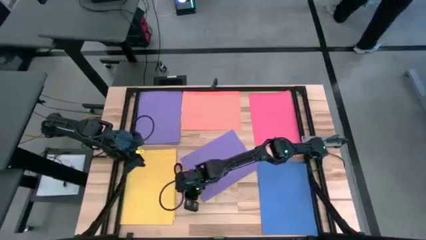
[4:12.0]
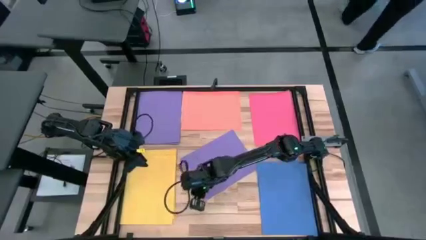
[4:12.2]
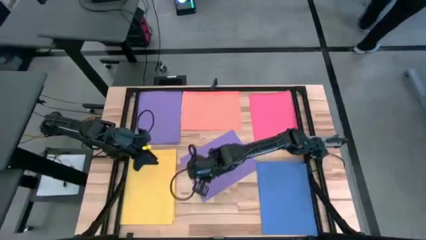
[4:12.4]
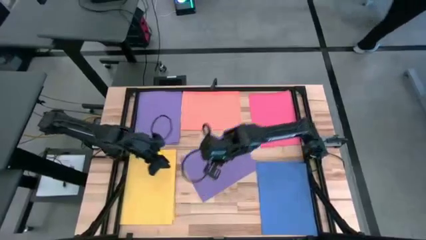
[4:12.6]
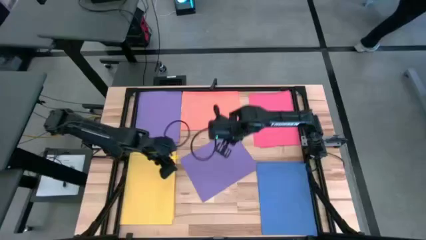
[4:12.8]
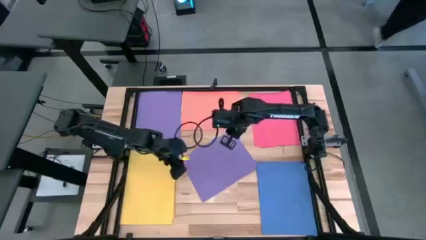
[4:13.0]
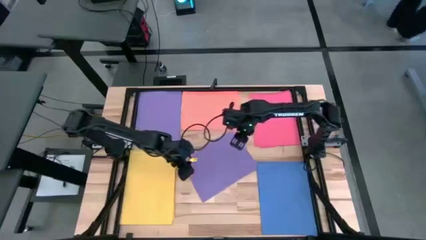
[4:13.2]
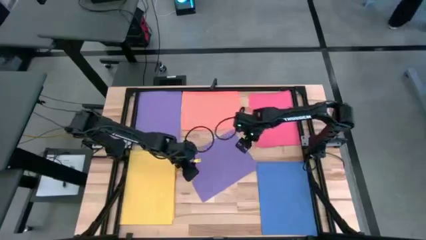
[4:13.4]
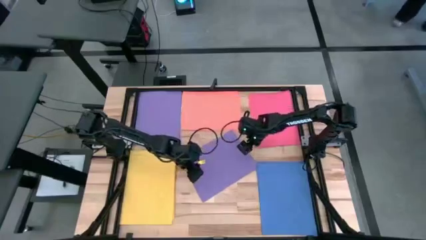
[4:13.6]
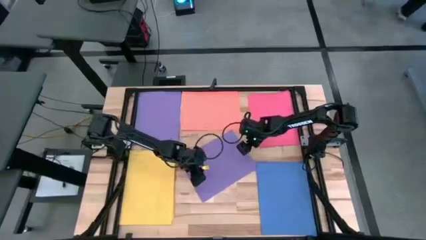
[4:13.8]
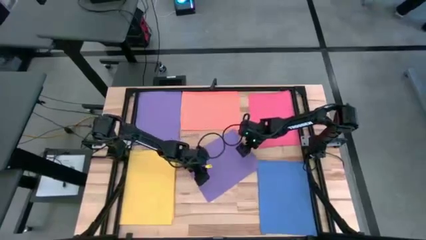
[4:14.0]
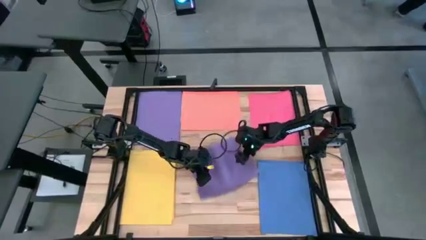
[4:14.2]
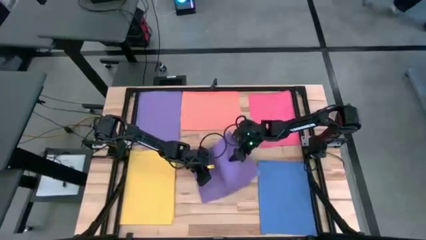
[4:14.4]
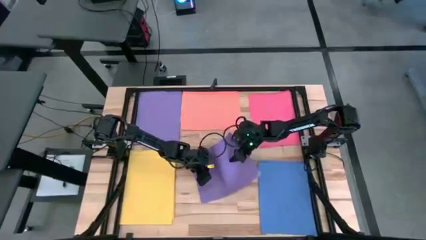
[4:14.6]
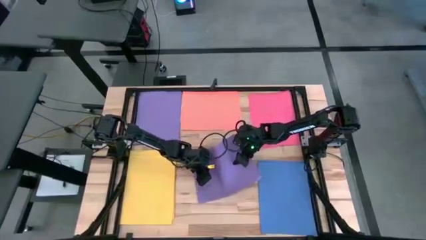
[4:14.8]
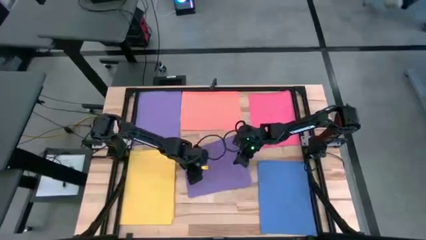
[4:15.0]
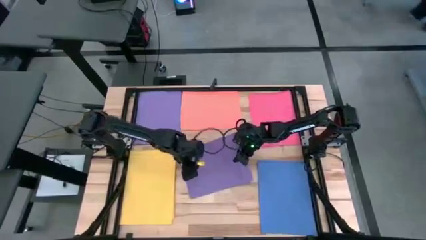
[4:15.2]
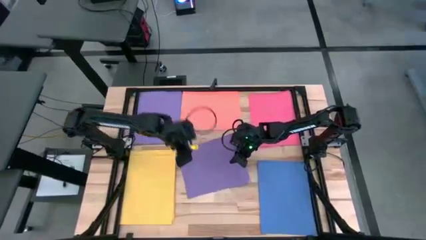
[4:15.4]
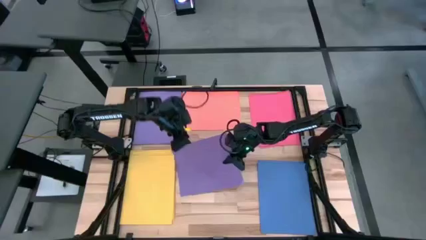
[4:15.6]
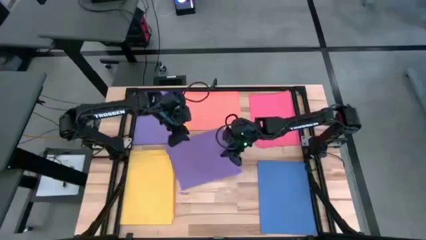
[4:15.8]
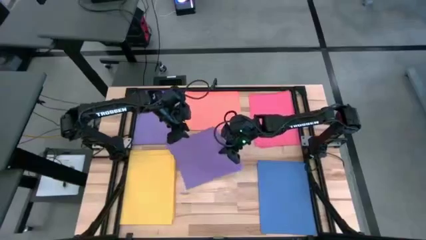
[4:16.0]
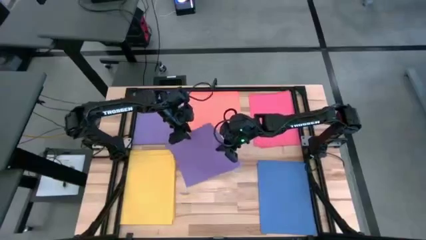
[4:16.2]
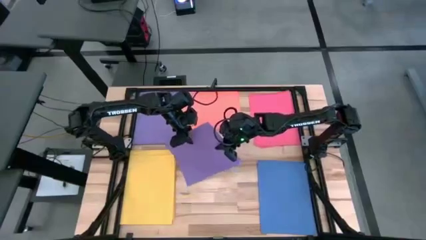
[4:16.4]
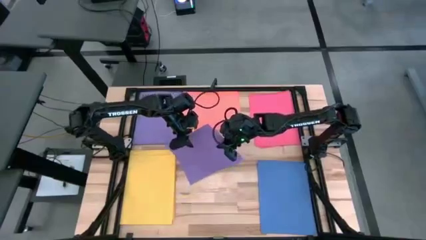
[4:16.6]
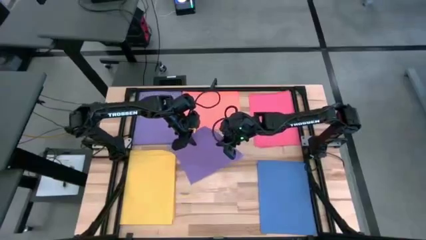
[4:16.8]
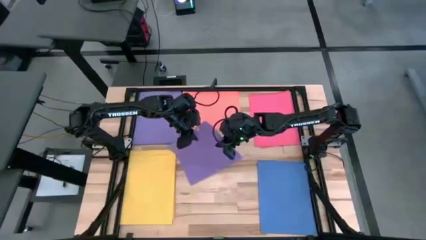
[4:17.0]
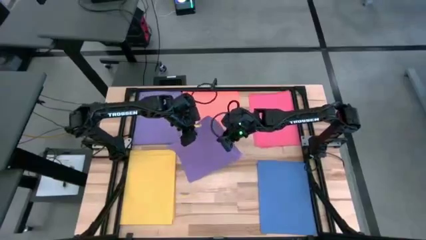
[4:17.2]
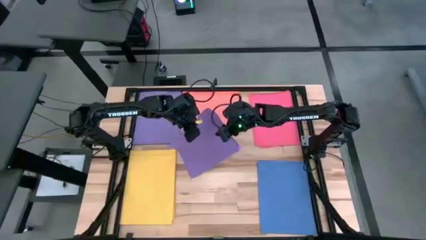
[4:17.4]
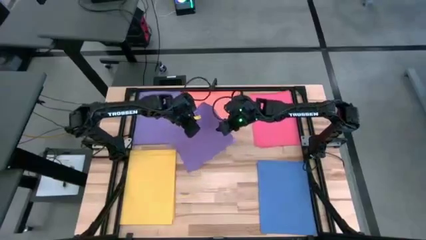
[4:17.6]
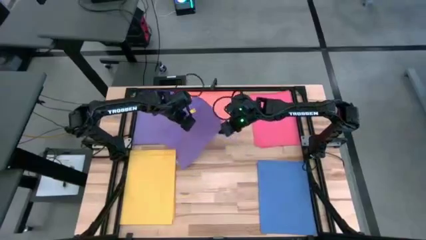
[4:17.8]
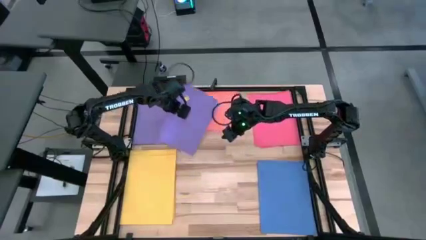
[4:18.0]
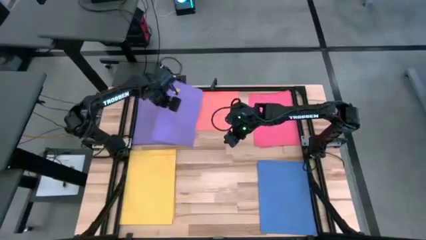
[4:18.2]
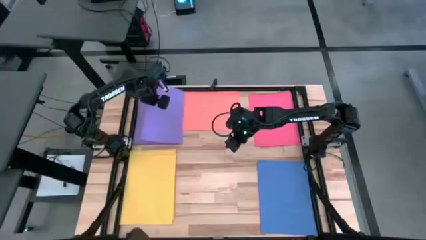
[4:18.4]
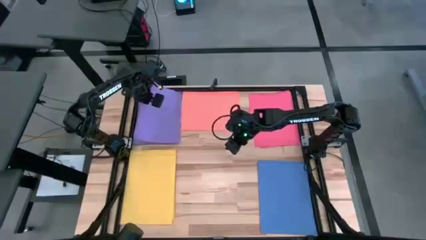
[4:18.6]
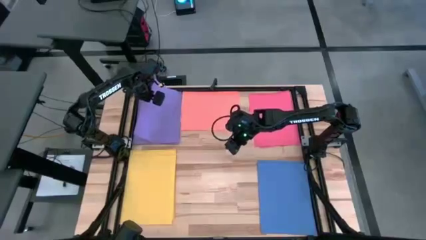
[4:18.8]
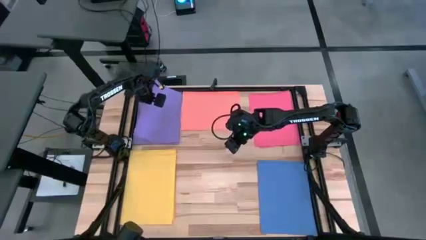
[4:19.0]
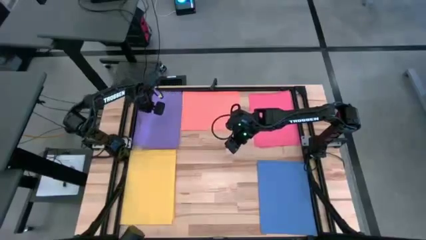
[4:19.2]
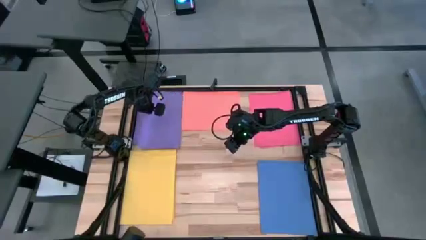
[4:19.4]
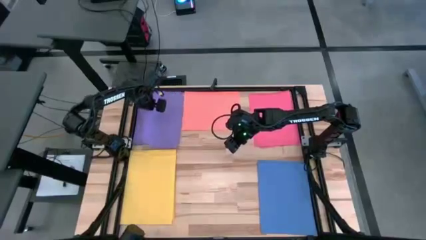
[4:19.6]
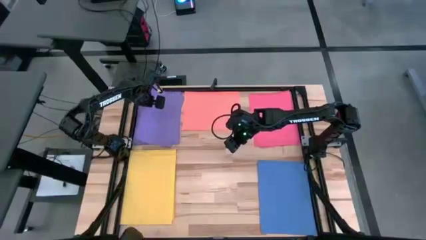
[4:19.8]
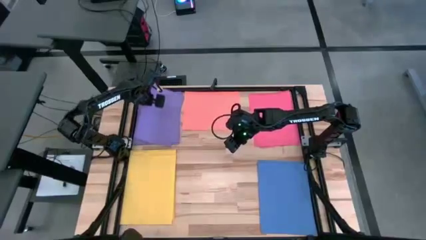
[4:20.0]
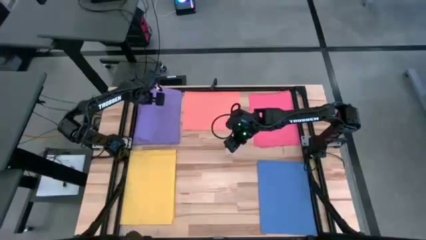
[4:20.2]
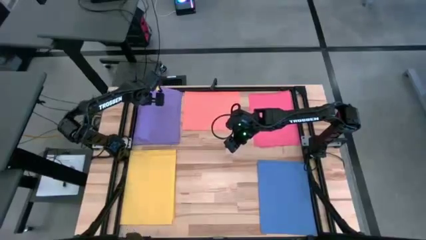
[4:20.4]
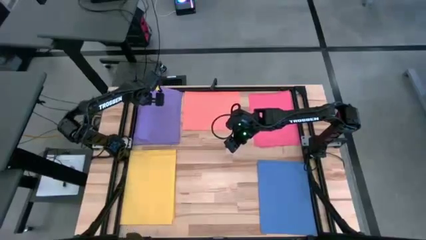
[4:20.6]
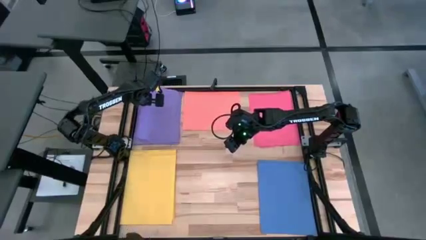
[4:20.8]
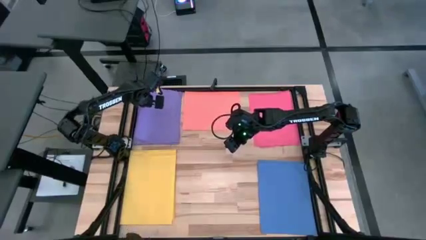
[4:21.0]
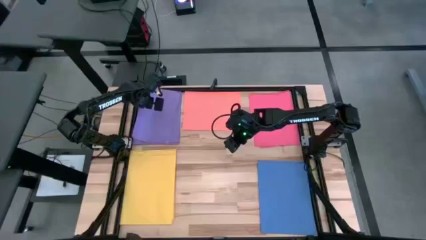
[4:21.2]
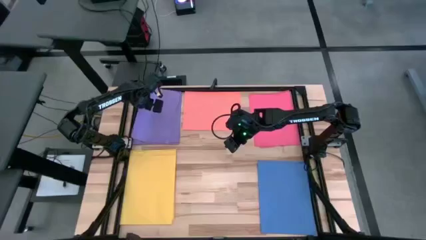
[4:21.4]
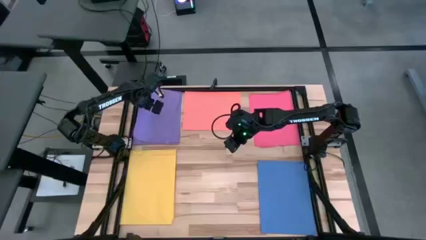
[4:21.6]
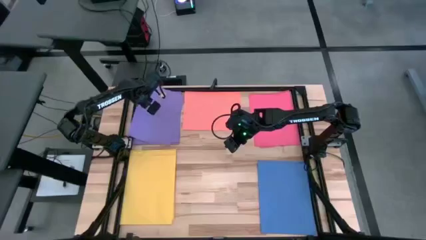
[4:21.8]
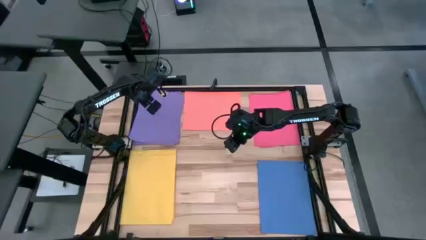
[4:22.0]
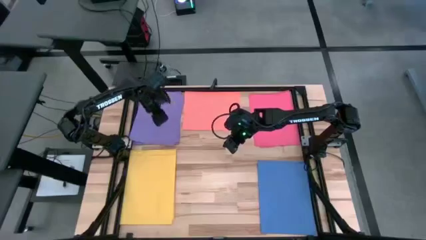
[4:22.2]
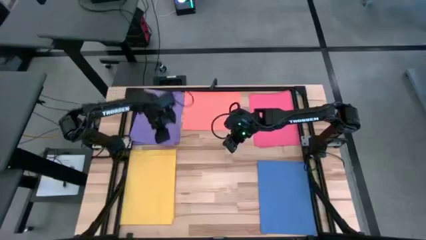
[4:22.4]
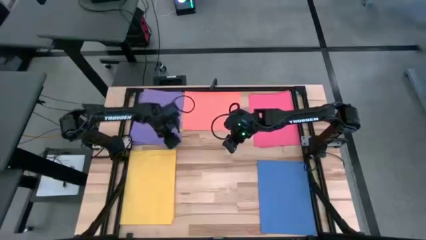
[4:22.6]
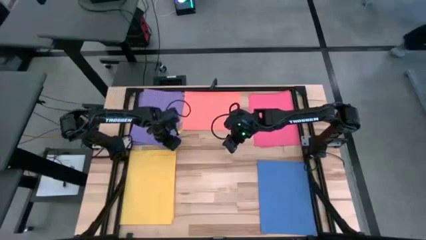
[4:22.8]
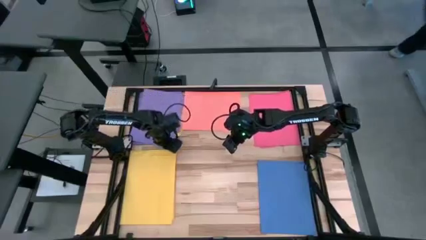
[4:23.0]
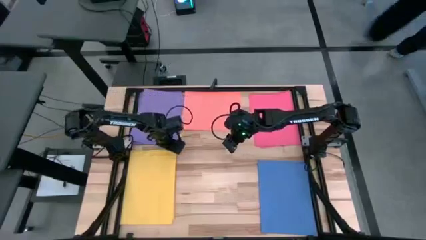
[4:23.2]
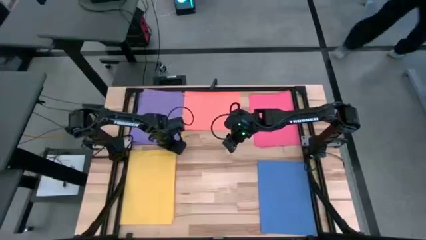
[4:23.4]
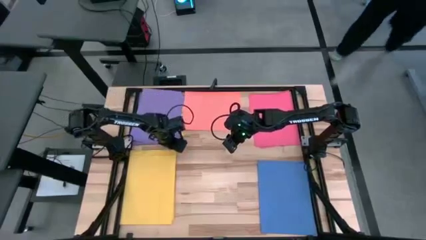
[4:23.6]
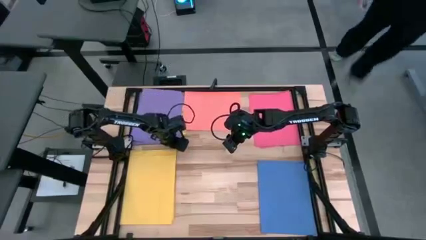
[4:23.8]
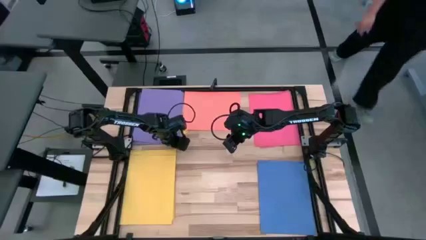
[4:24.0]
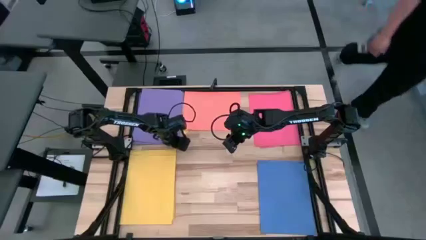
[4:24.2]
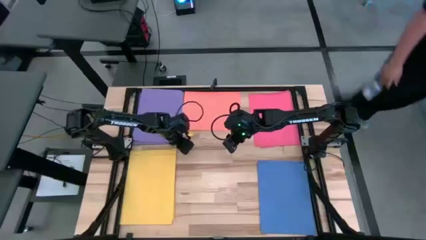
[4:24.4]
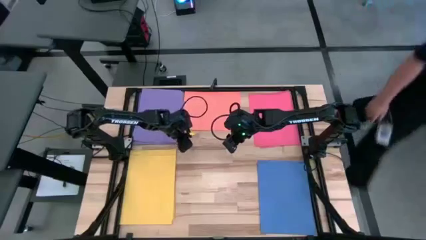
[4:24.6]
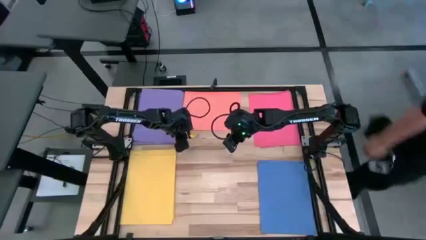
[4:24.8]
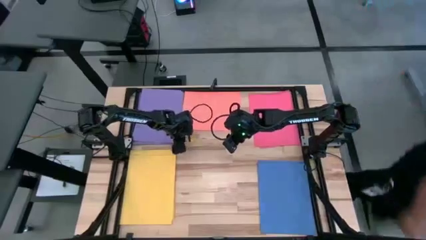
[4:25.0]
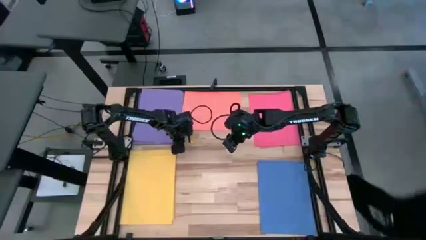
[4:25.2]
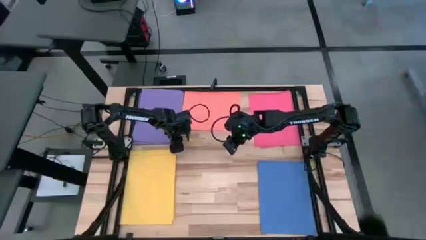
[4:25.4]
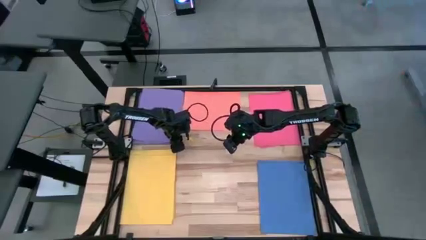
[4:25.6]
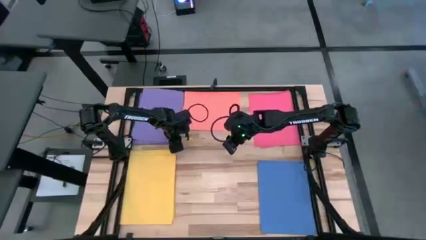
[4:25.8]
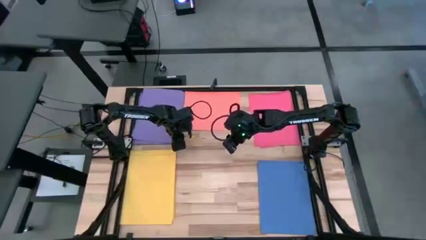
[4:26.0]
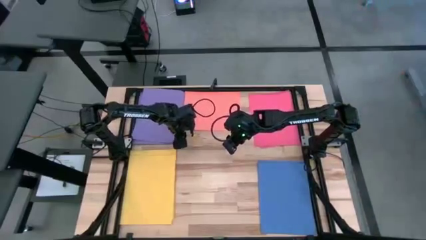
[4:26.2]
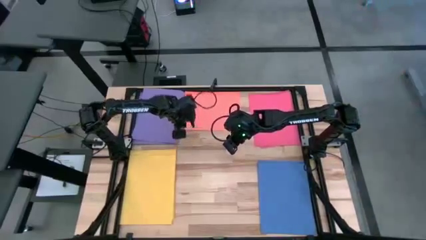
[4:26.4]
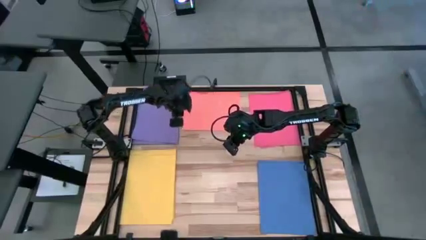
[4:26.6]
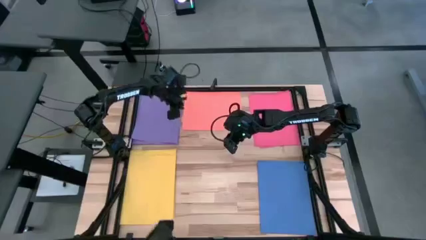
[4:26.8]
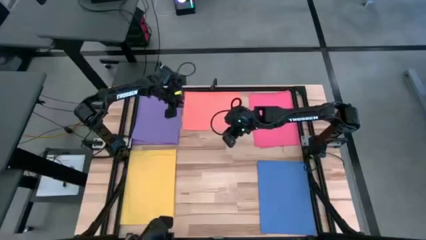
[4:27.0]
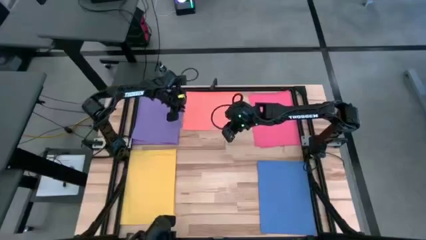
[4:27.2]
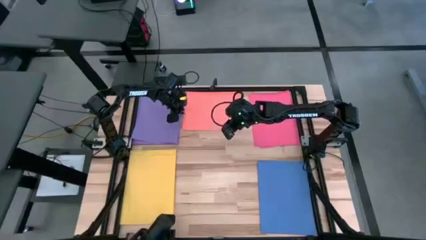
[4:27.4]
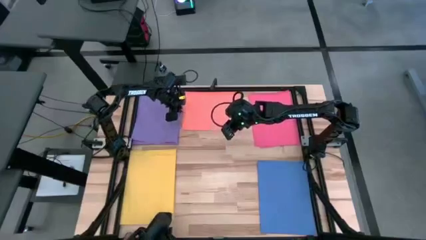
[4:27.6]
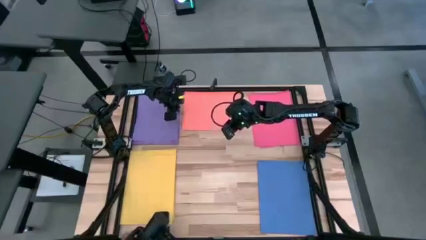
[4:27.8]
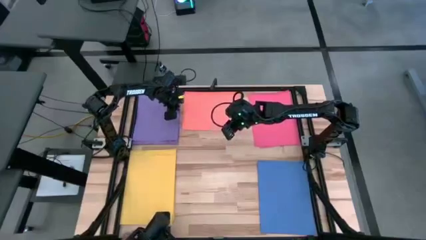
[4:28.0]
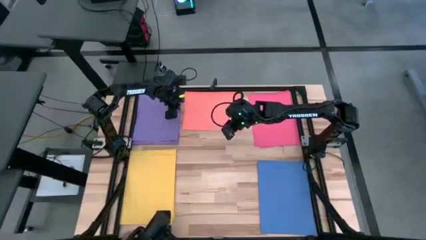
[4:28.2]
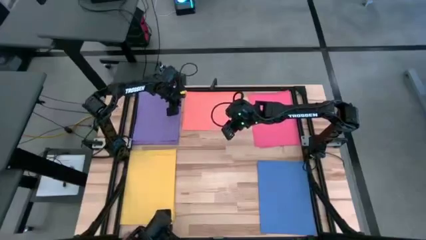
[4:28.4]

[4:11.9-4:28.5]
Task: Organize paper
Stack the purple paper on top of the other purple paper

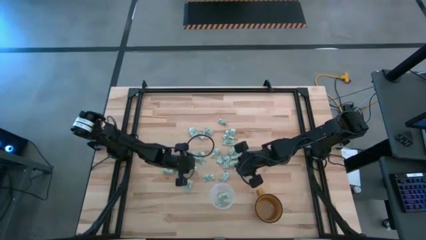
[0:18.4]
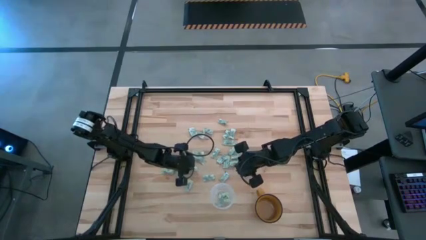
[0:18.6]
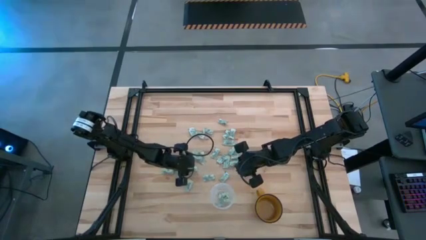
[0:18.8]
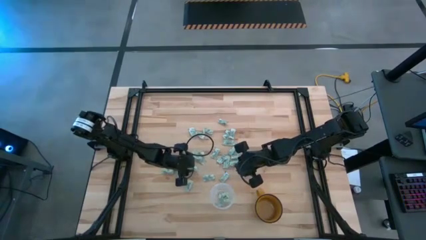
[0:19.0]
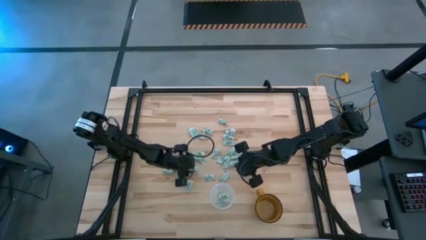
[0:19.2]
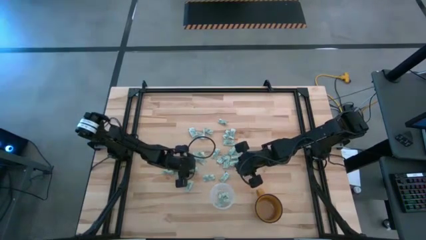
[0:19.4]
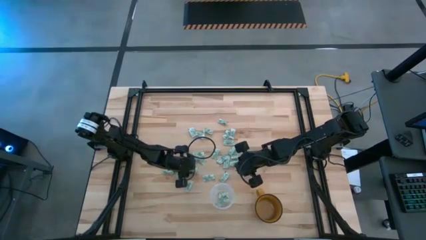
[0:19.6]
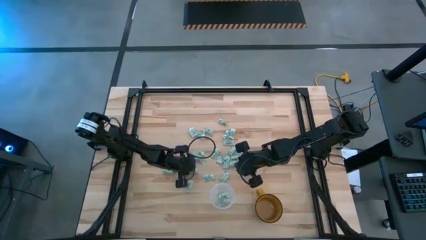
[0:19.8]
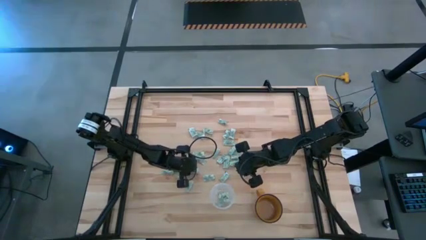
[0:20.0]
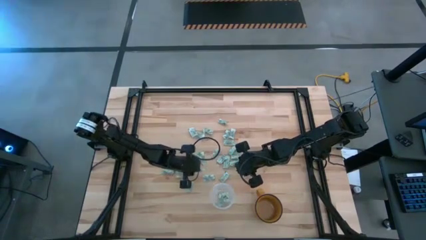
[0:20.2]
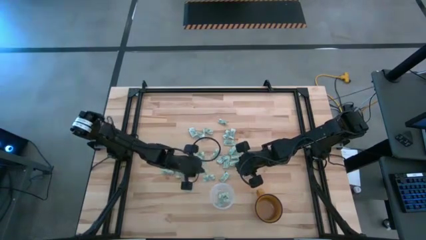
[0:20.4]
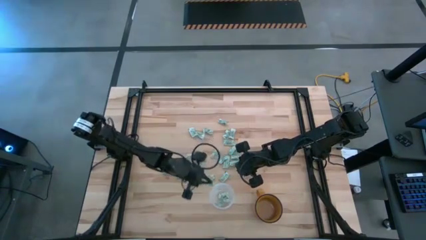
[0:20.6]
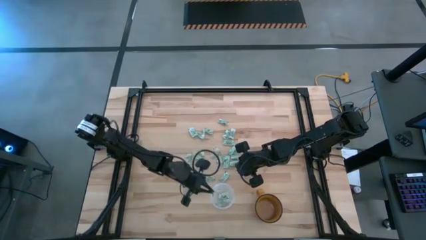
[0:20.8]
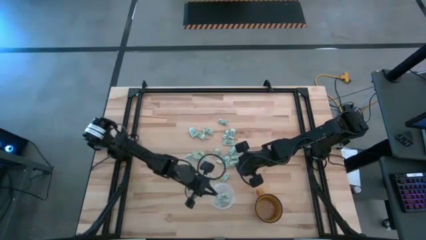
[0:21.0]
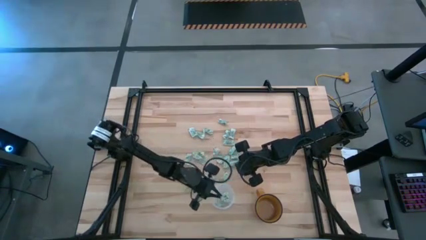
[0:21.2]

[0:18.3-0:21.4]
Task: Pick and place Stevia / Truvia into bins
Put the stevia packet into the transparent bin
